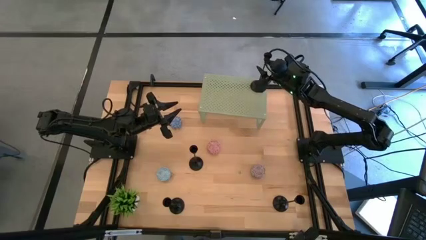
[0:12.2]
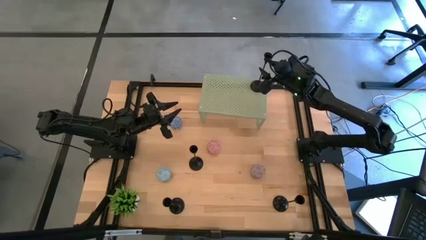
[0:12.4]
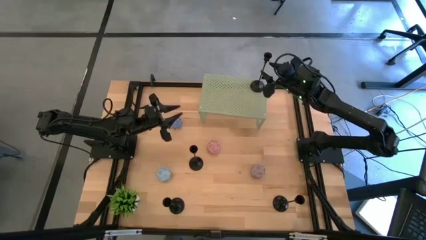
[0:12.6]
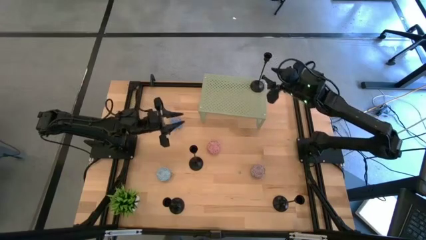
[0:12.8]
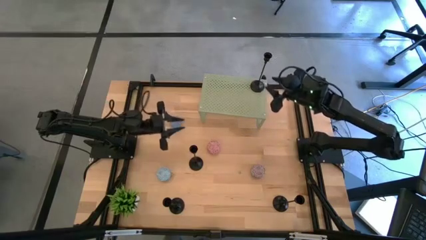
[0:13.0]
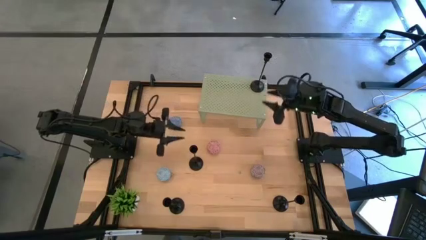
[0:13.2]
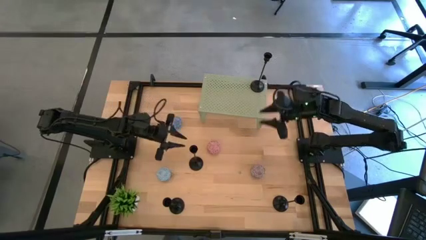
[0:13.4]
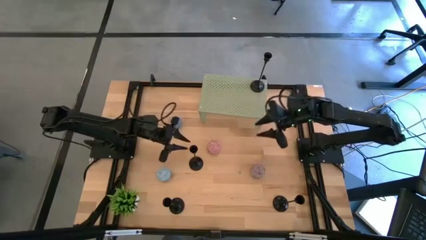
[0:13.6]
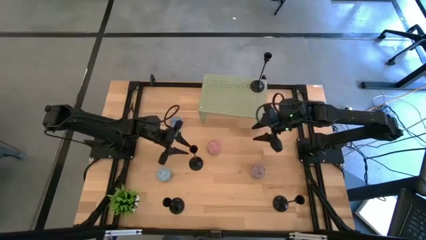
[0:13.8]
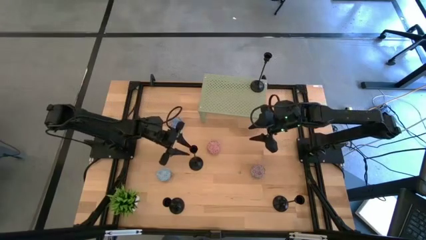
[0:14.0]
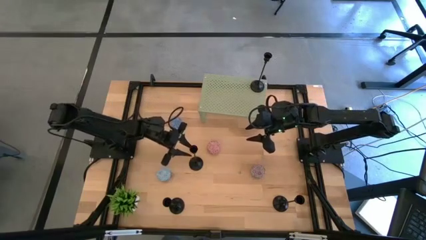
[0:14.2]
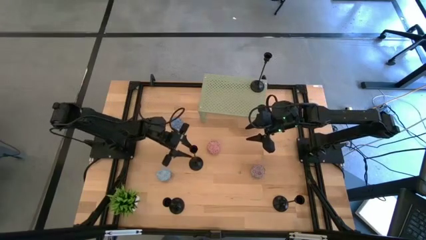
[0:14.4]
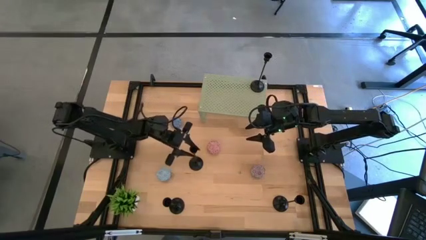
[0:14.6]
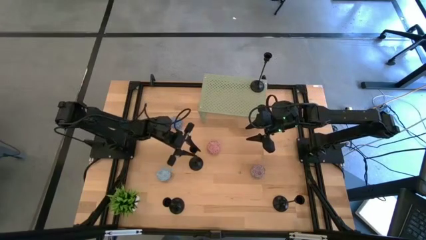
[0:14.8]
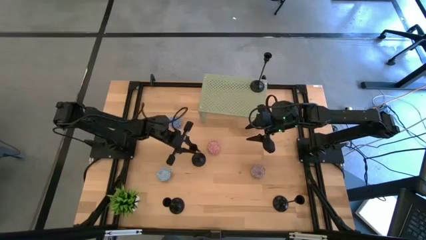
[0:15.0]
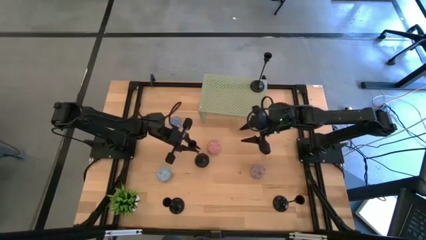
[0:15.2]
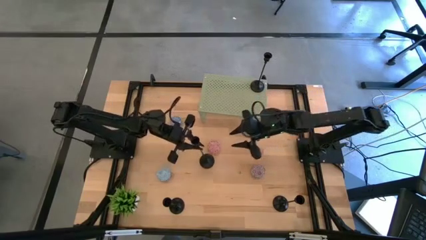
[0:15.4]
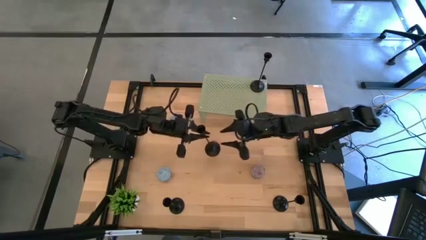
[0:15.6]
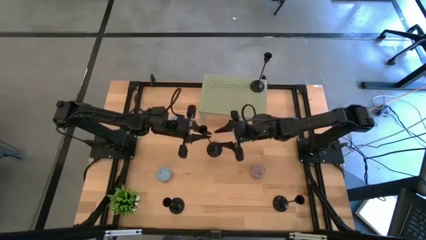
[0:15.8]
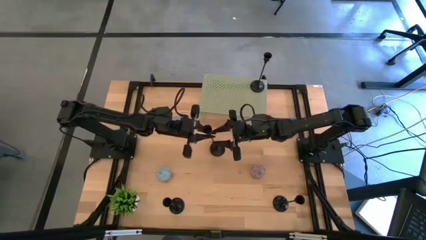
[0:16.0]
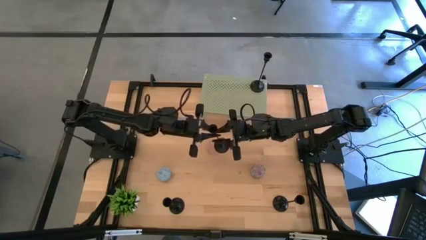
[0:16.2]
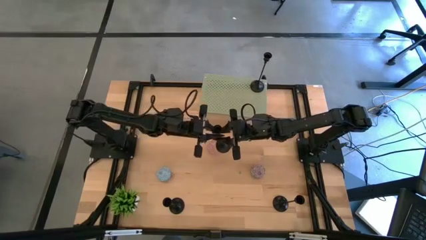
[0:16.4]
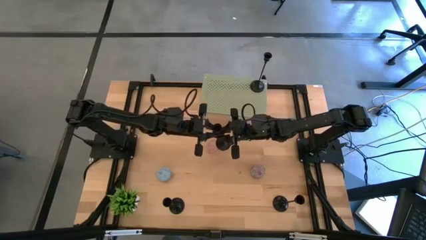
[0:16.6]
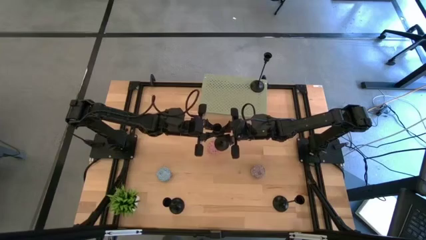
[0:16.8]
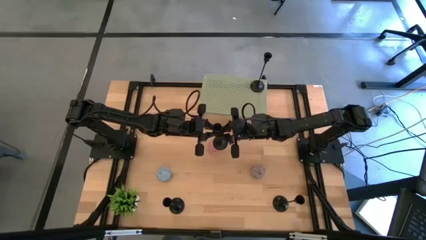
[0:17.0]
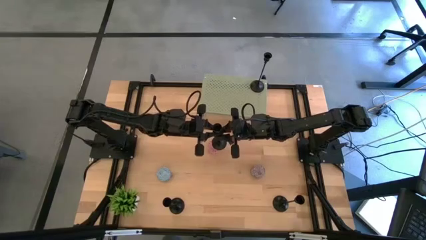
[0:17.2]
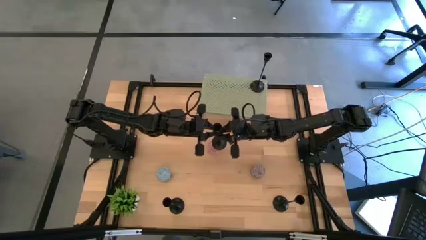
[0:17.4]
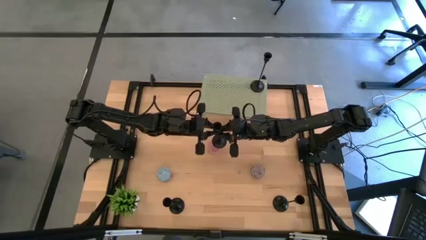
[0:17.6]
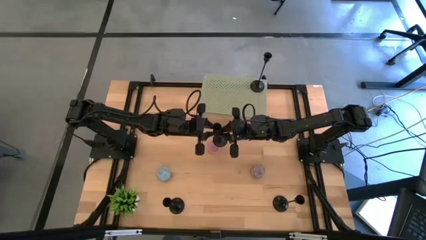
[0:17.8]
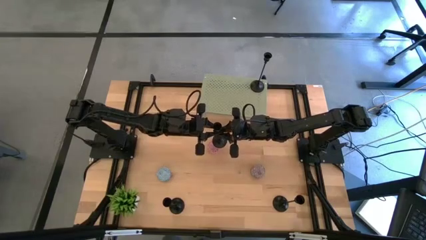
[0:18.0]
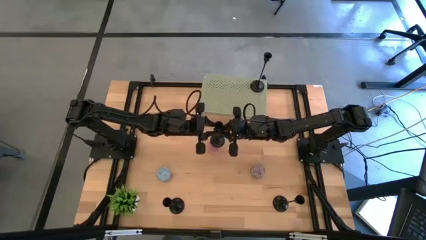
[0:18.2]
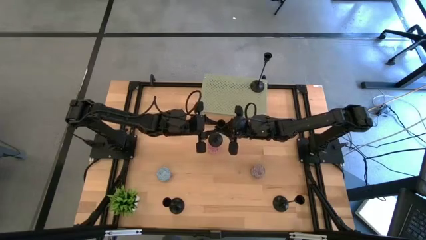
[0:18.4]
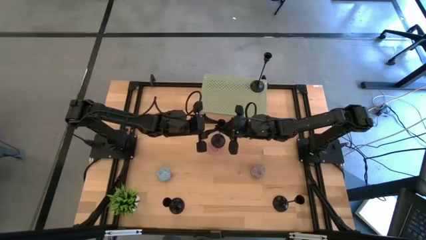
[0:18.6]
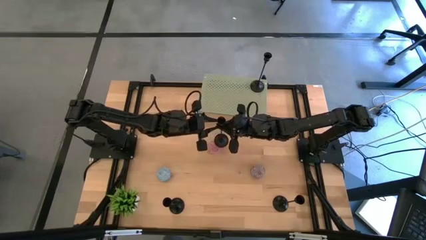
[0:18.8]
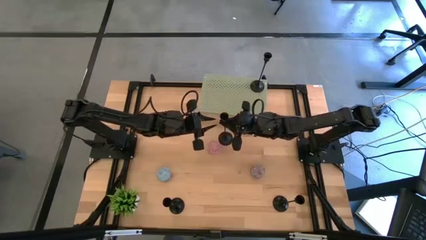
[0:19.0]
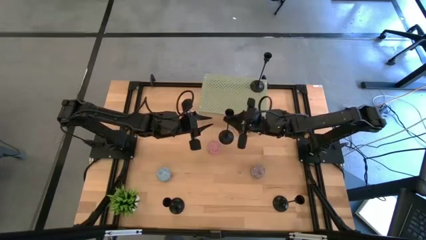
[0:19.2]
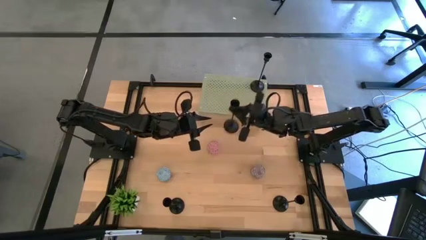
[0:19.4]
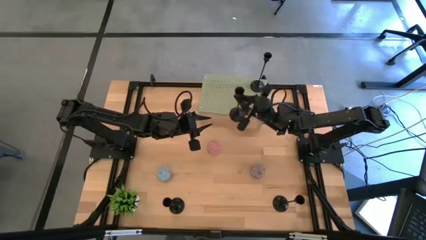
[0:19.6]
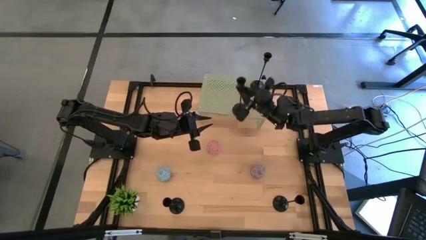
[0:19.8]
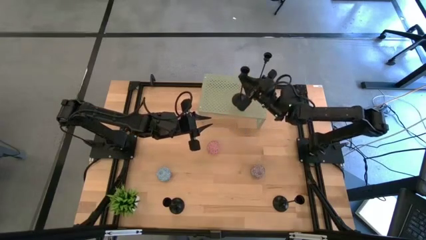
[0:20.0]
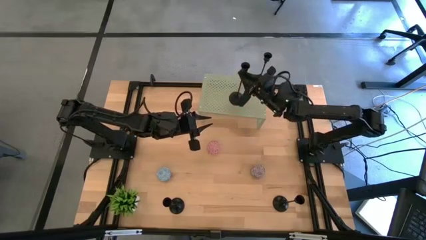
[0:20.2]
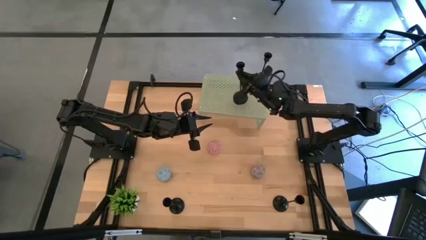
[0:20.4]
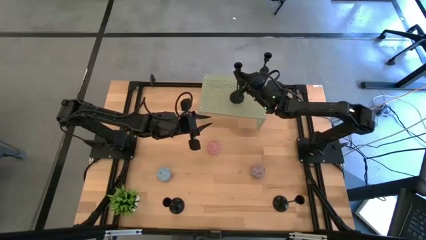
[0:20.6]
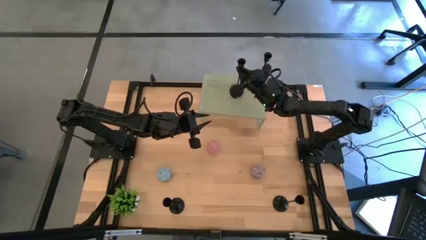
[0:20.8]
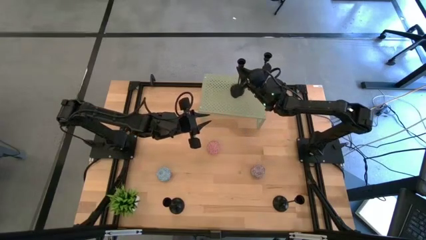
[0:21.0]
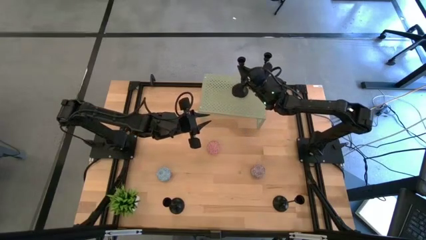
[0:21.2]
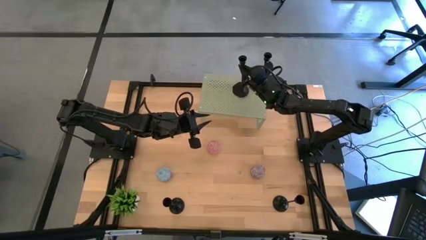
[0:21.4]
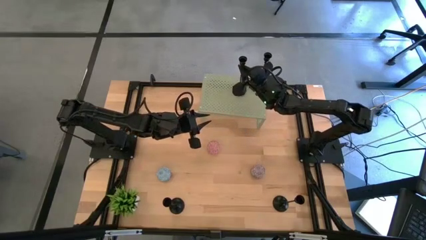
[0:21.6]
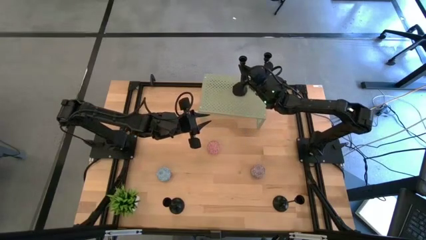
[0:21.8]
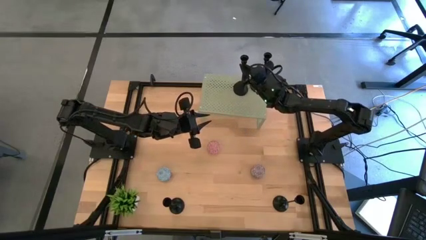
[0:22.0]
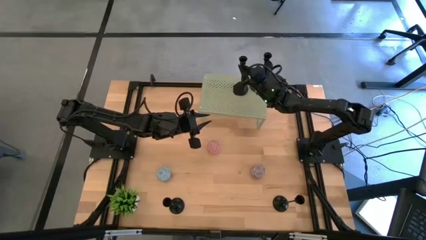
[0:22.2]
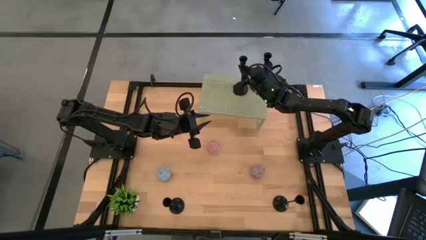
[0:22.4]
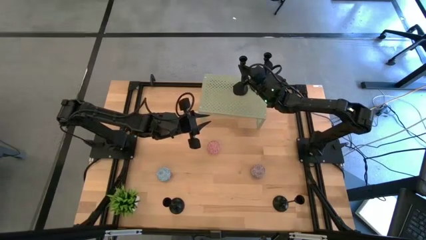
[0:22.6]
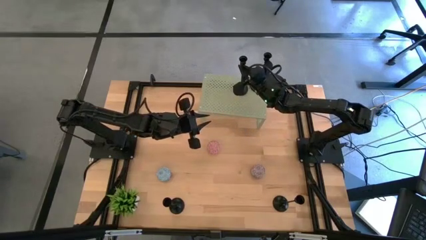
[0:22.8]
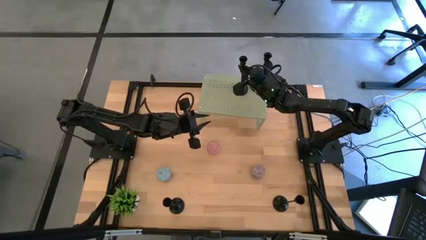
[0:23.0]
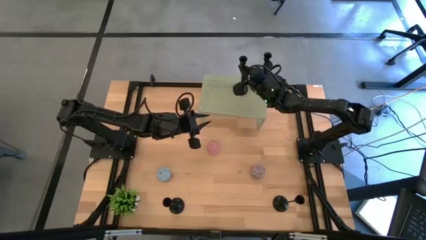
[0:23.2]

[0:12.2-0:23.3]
Task: Pick & Place candle stick holders
Put the middle black candle holder on the shelf

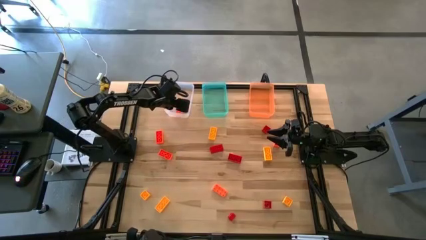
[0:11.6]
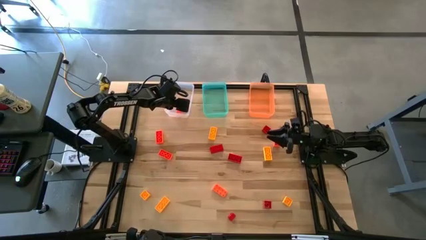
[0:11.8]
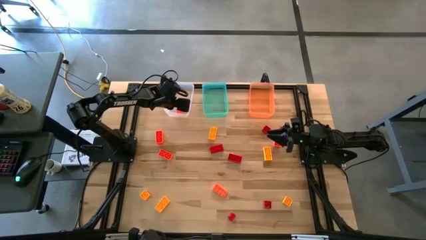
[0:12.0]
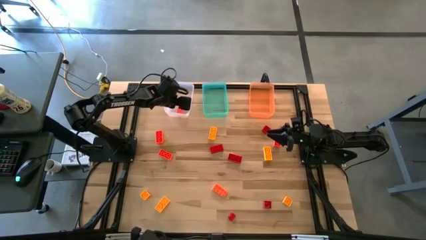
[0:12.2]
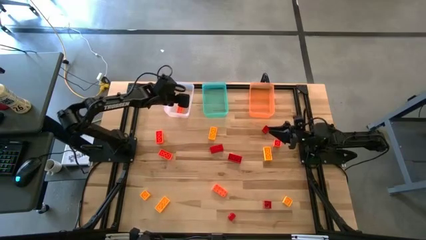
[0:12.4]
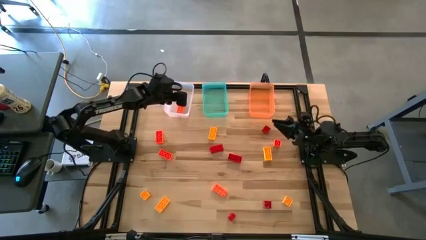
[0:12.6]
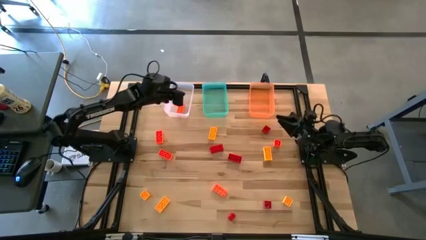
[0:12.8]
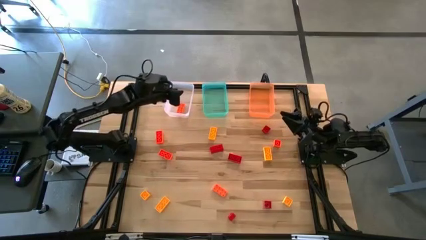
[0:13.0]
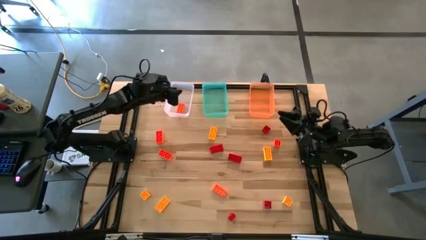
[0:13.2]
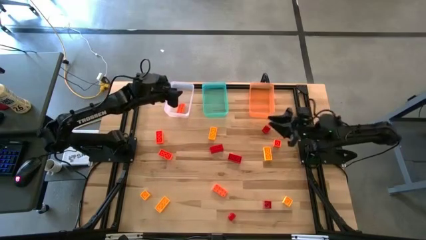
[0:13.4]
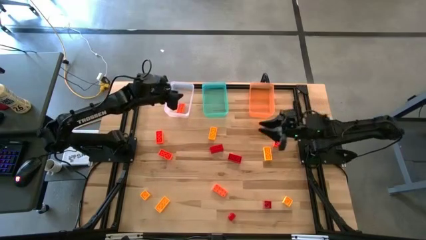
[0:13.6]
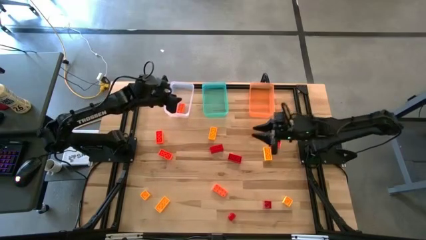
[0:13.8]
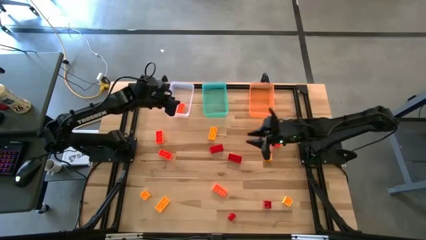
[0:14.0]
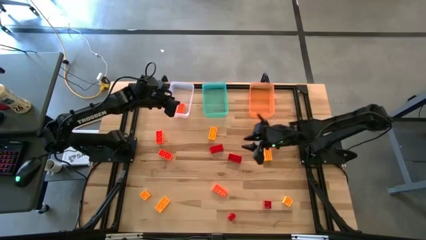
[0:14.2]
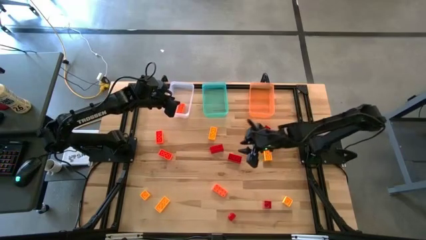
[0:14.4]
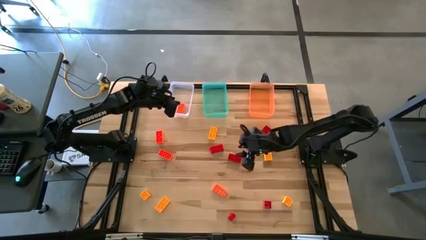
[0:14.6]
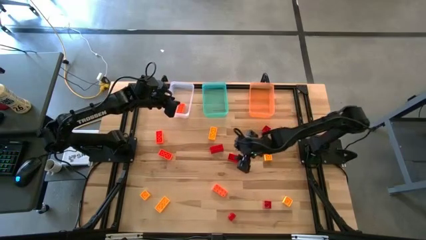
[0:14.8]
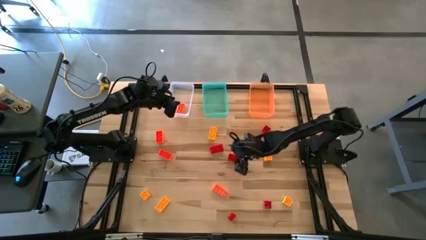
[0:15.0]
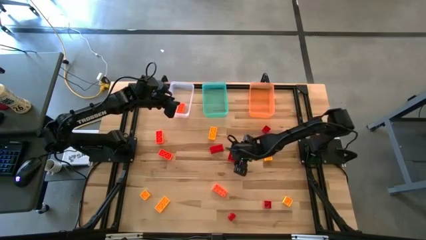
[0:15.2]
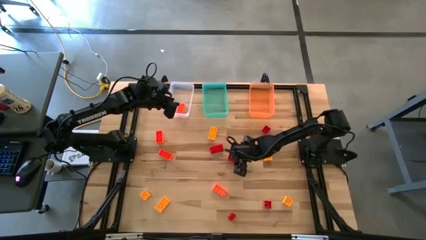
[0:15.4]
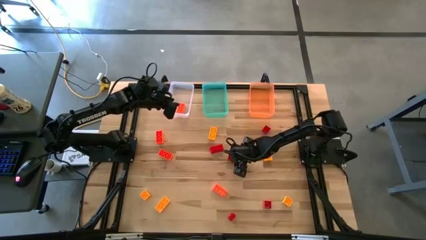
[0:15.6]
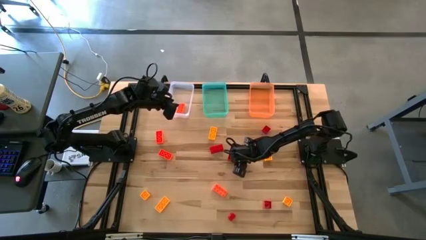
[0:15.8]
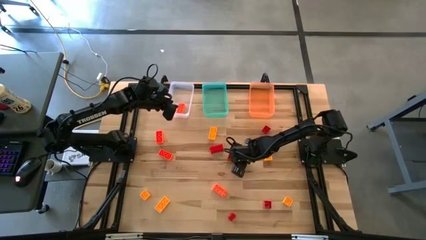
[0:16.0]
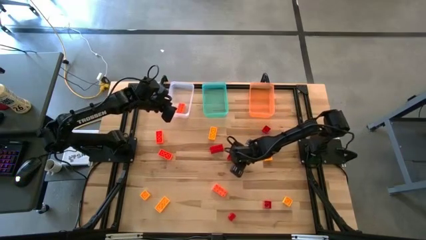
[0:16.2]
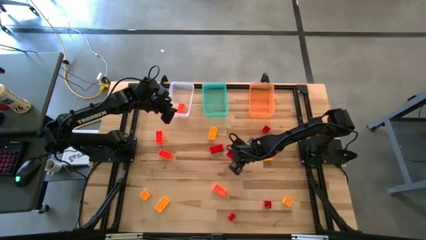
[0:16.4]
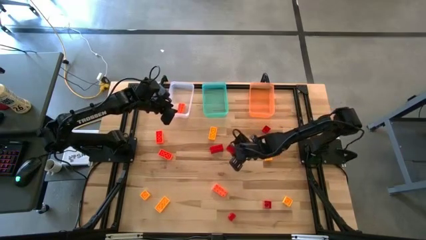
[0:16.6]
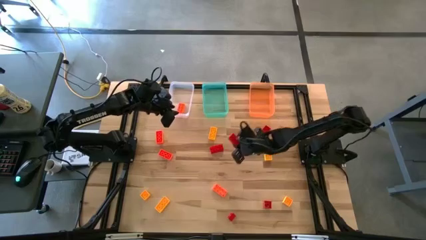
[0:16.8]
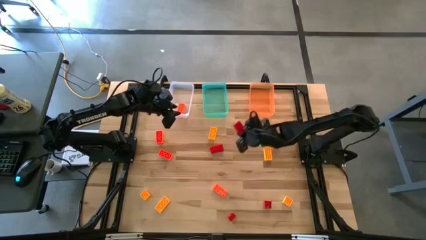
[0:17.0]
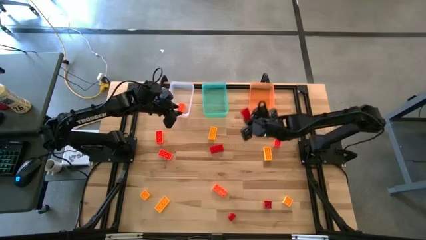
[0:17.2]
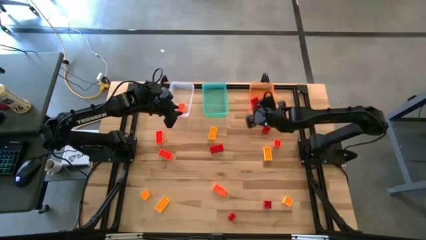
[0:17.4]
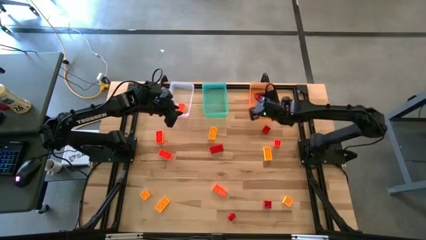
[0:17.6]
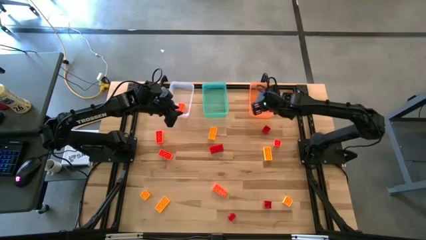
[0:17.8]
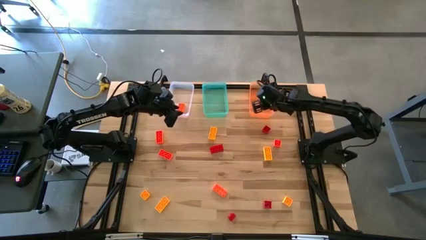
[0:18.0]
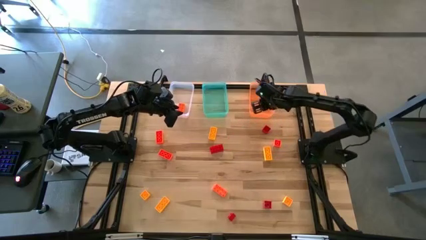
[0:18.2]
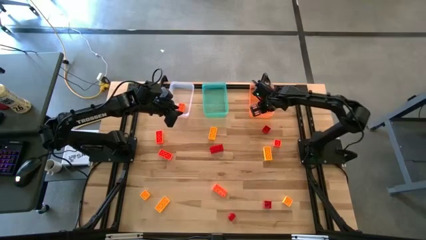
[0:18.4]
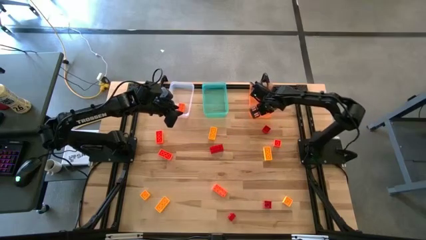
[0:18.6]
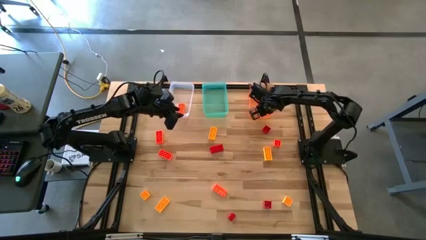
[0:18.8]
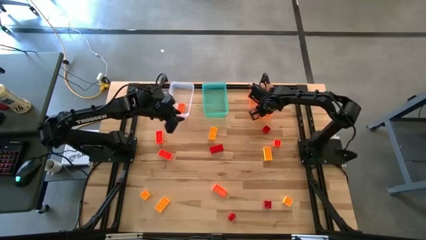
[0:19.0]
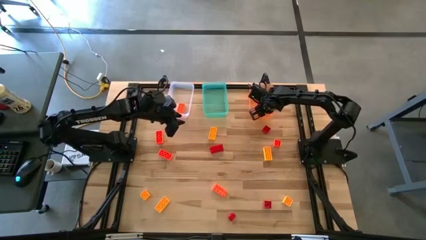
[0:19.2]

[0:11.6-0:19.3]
Task: Sort & place blocks by color
Put the red game piece into the orange bin
